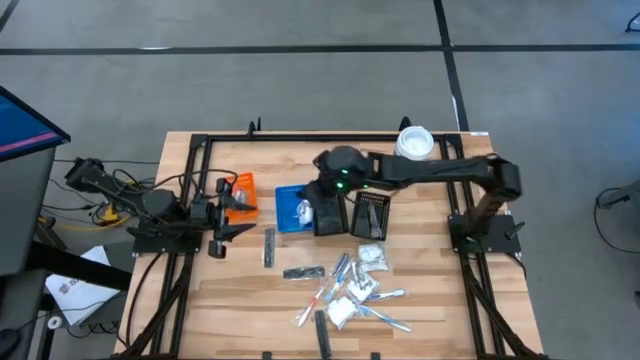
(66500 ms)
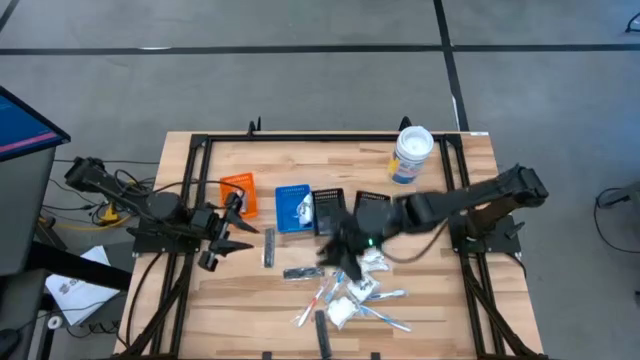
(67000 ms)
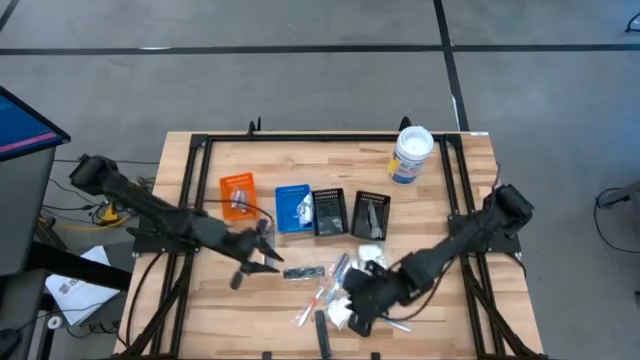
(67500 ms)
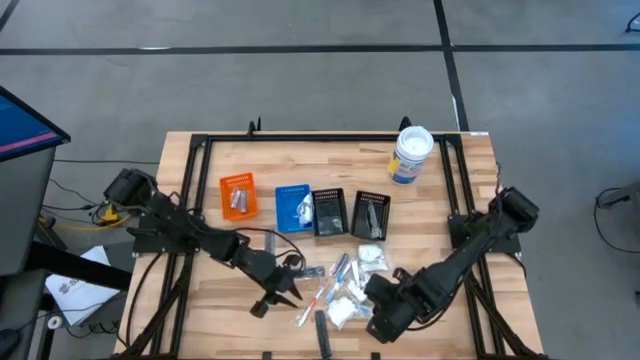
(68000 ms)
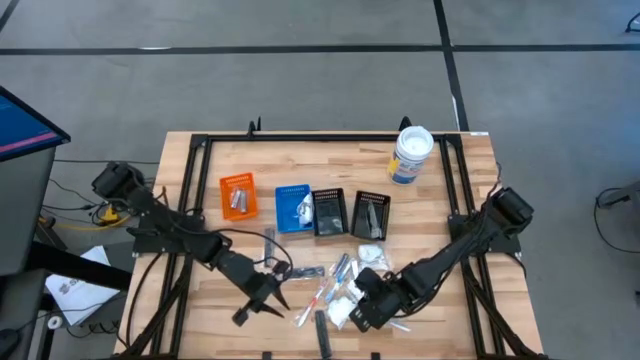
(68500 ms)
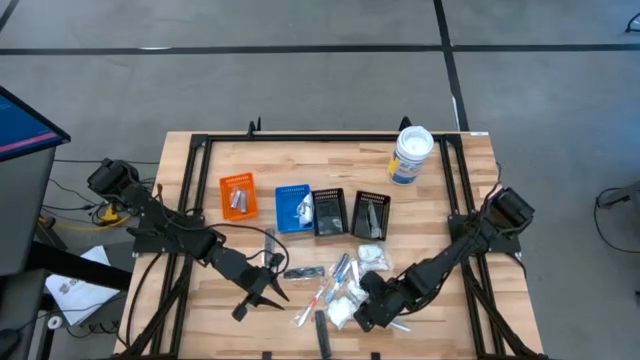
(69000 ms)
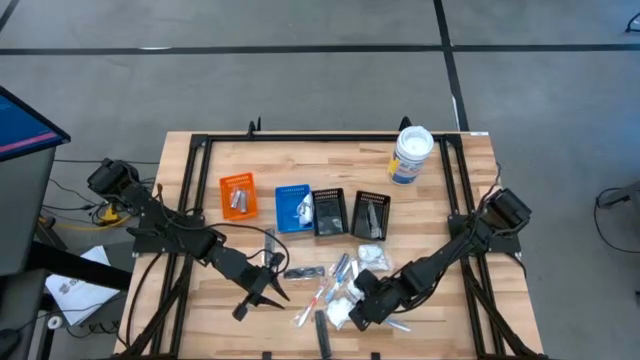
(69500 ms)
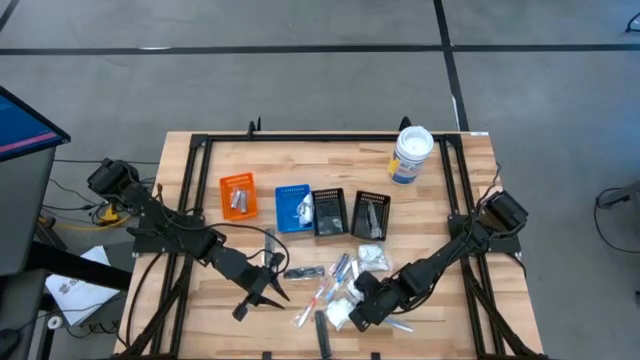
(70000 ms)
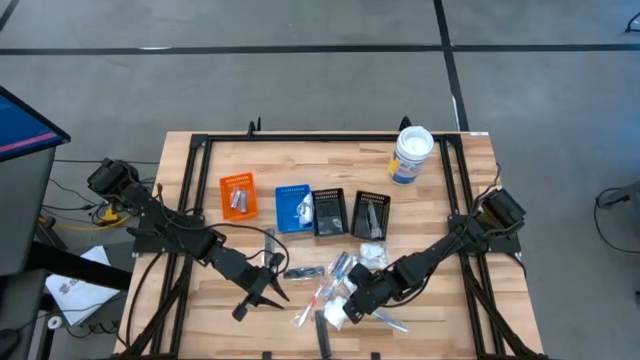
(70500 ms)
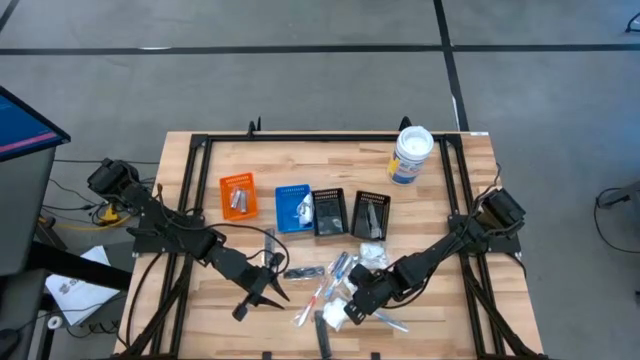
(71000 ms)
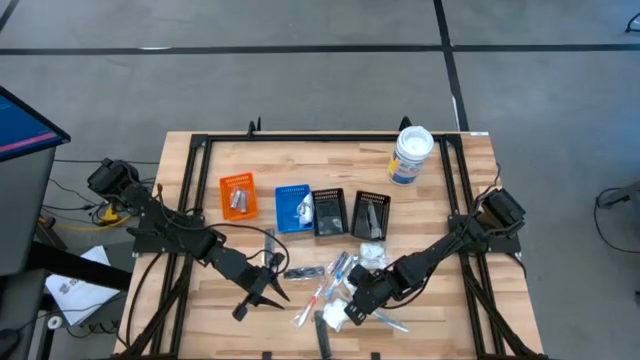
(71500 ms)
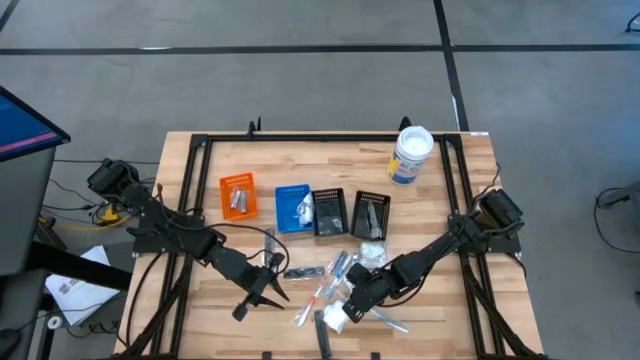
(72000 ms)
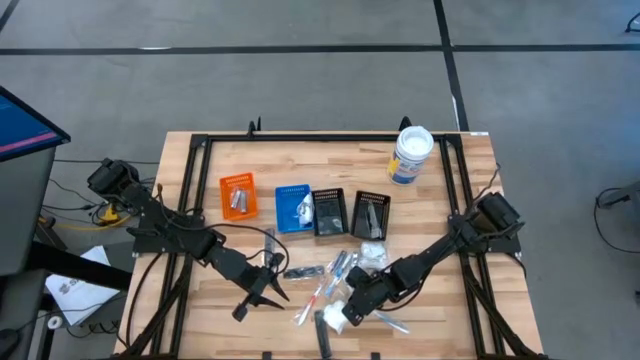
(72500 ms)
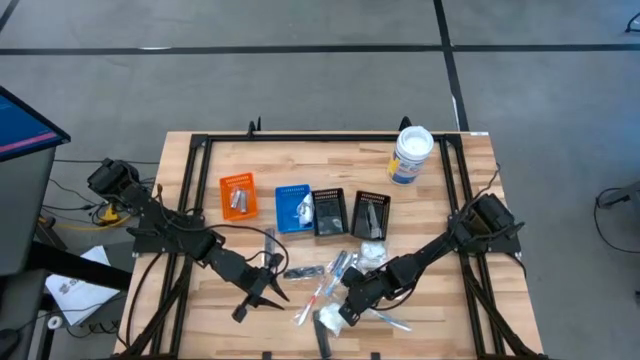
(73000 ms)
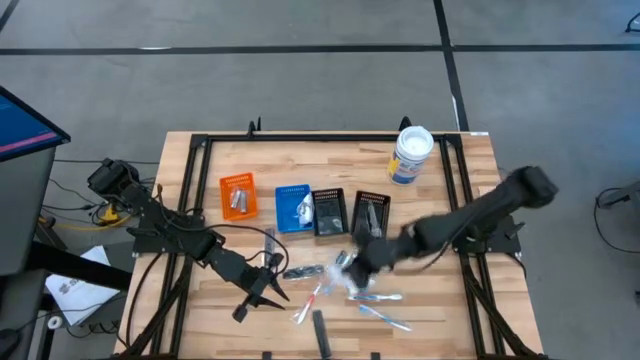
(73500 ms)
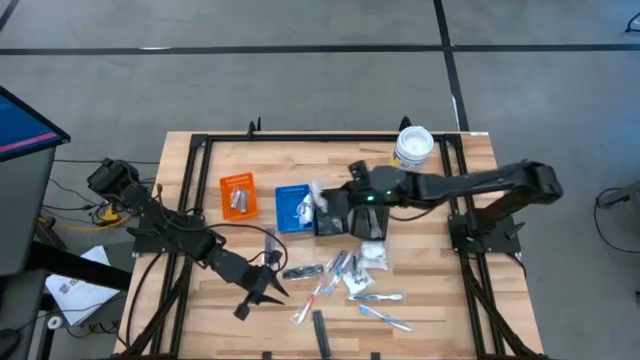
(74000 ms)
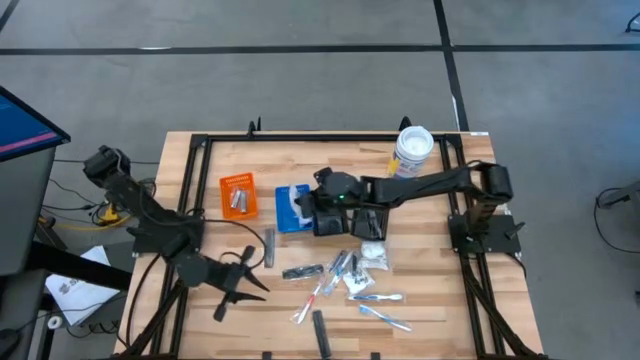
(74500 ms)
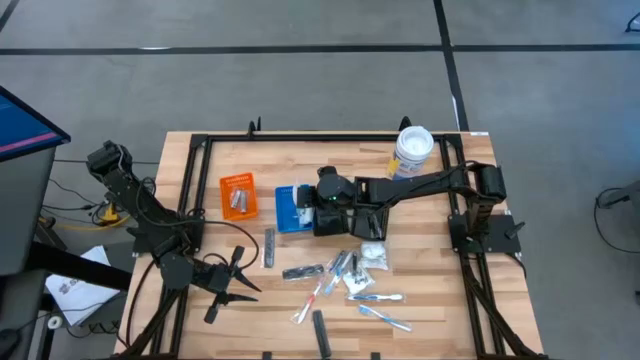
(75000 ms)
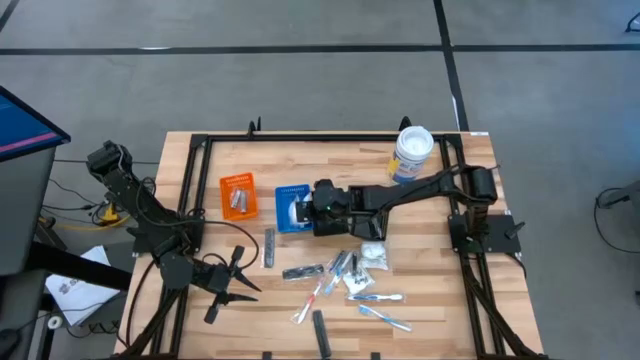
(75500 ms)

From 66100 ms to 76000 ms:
Task: Pick & Place Travel size toiletries
Put the pack of cotton buds into the blue bin

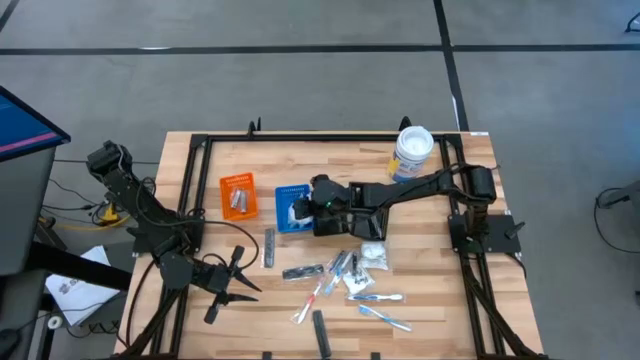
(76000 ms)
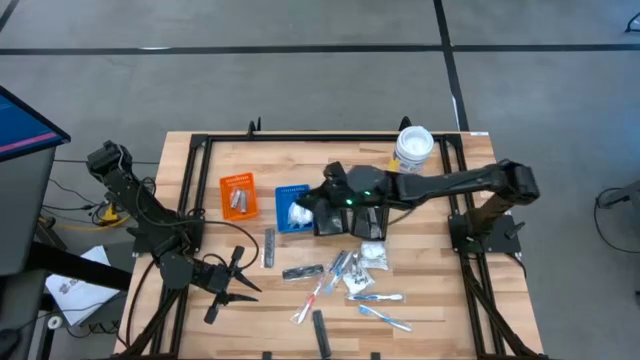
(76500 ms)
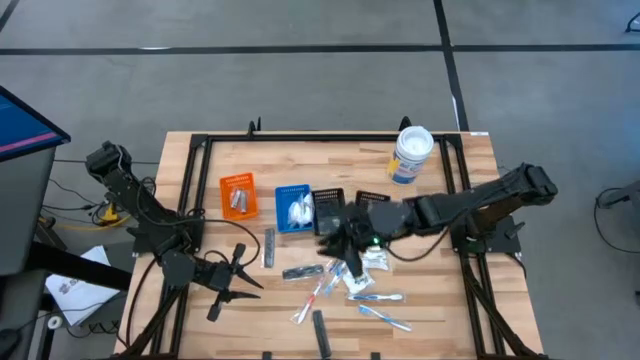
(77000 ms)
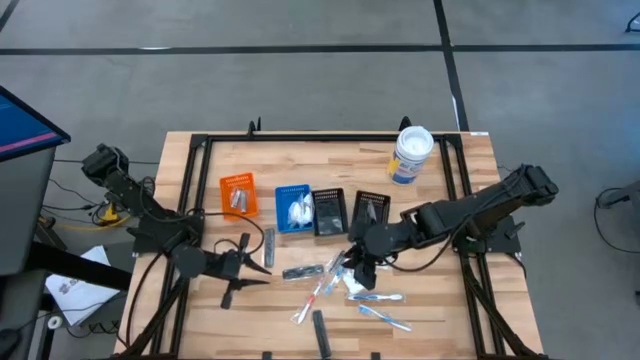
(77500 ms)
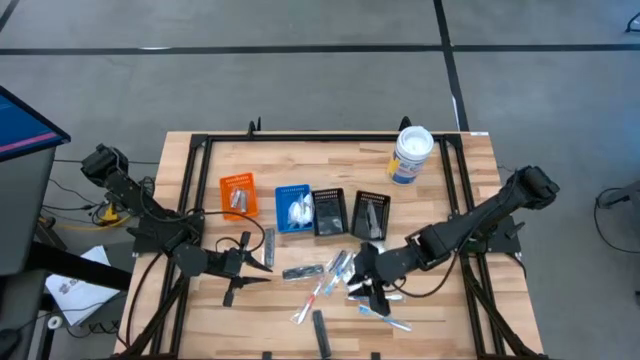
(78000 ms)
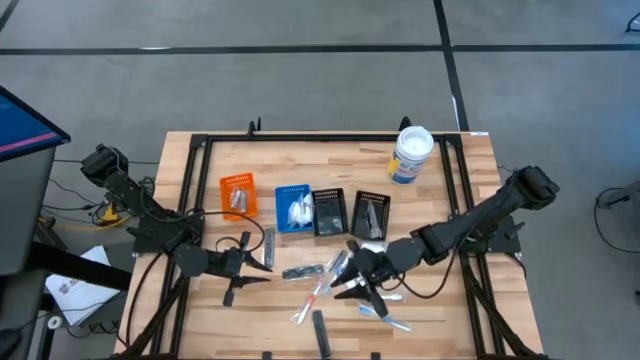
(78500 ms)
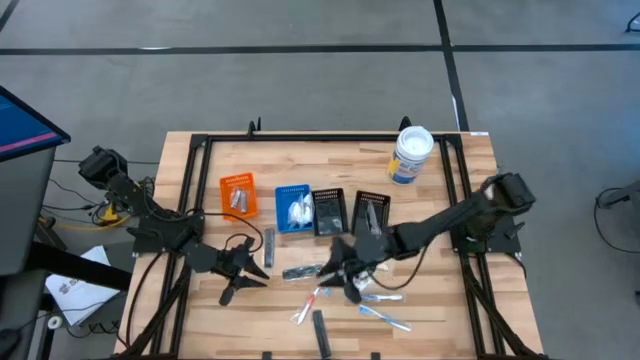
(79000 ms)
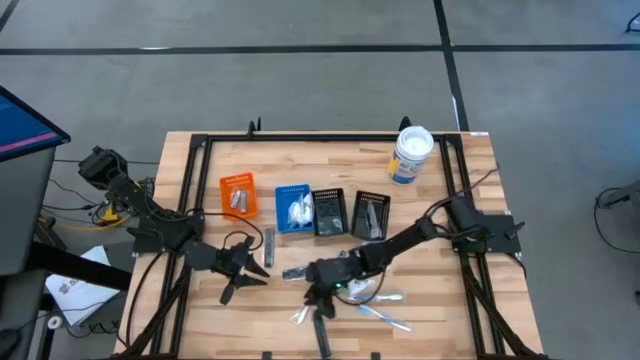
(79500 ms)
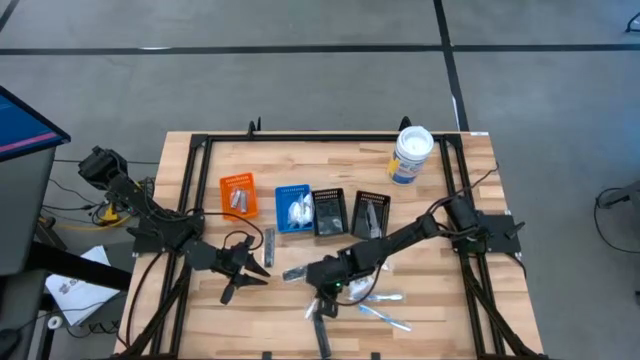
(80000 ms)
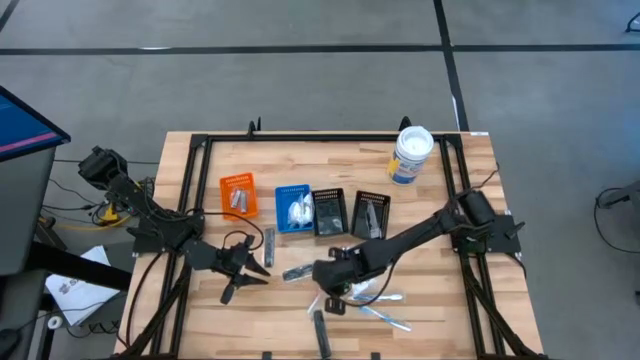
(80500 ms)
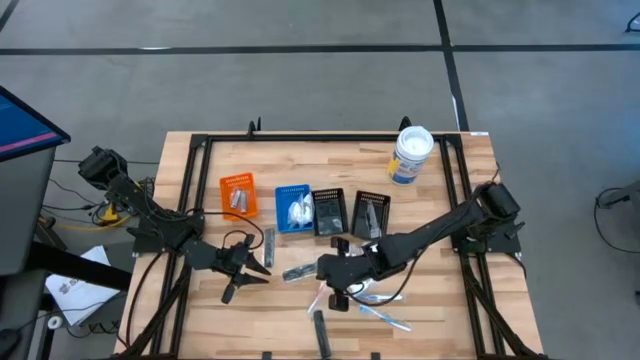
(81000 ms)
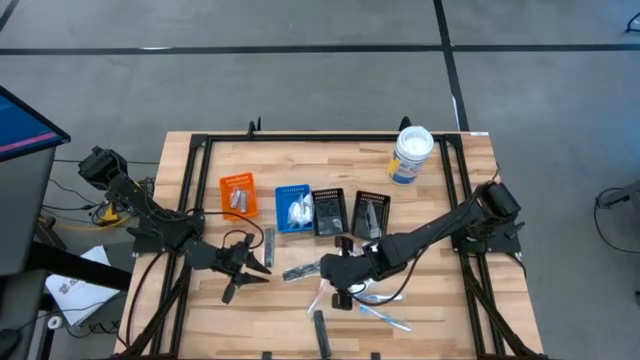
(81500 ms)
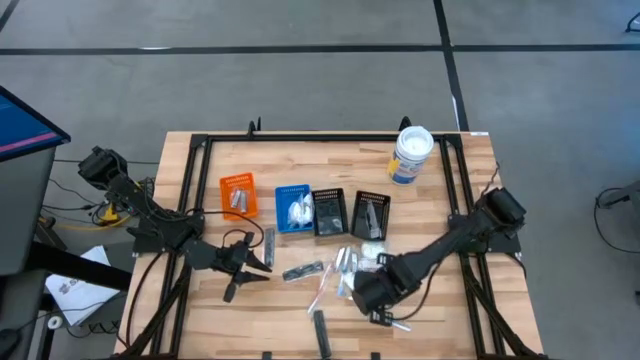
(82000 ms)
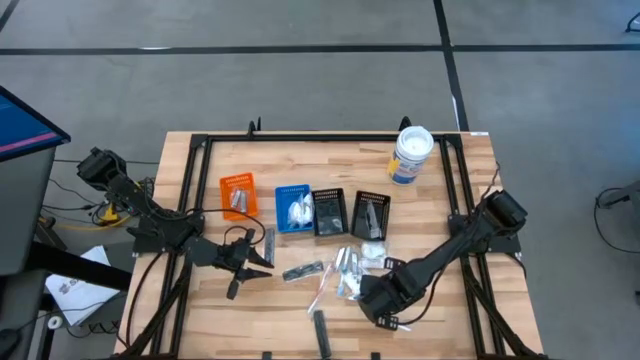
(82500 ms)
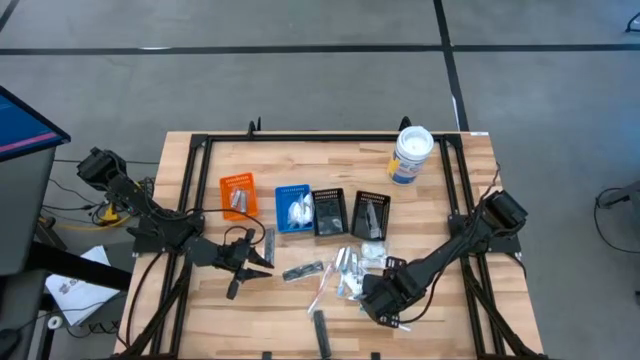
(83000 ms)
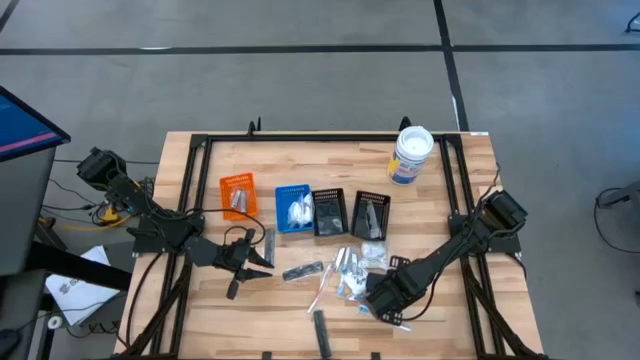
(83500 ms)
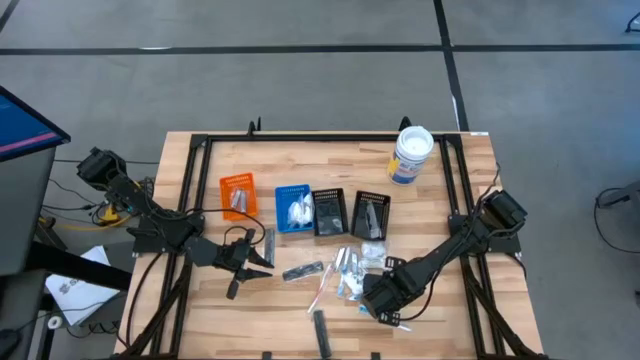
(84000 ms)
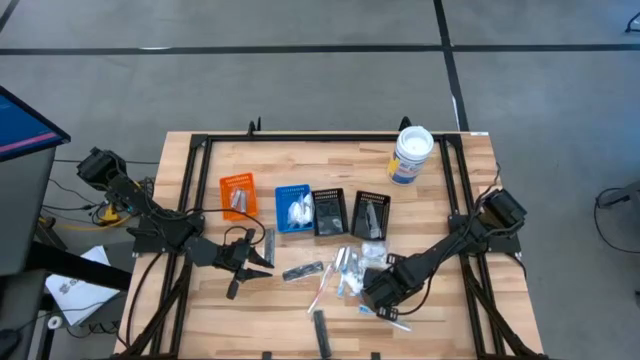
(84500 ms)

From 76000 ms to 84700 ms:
Put the orange toothbrush into the left black bin

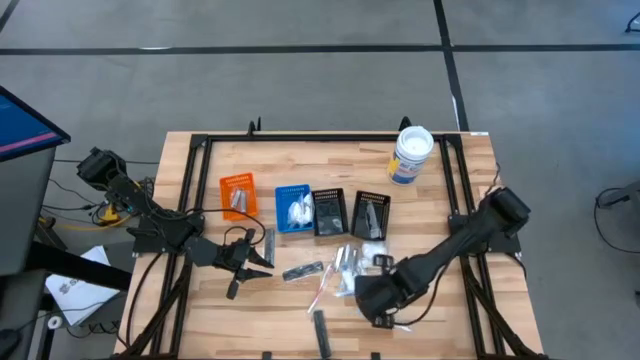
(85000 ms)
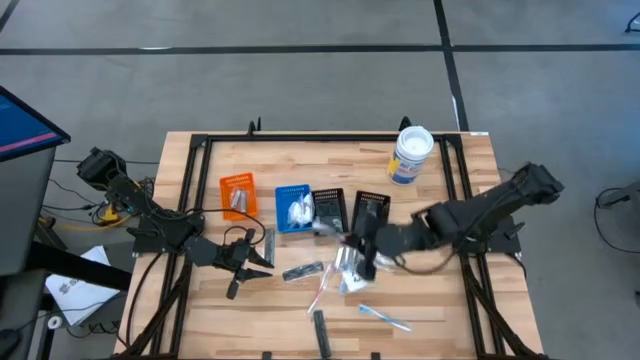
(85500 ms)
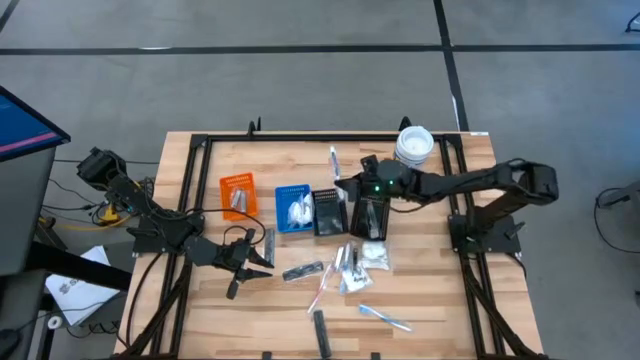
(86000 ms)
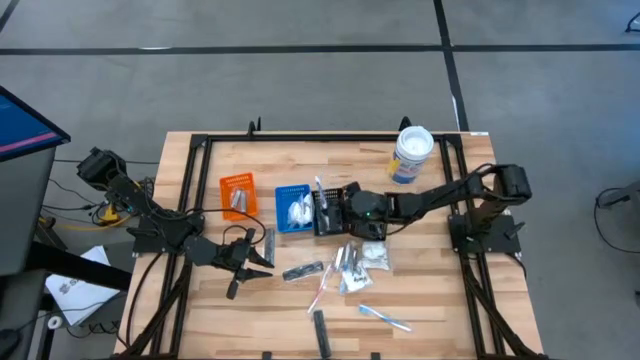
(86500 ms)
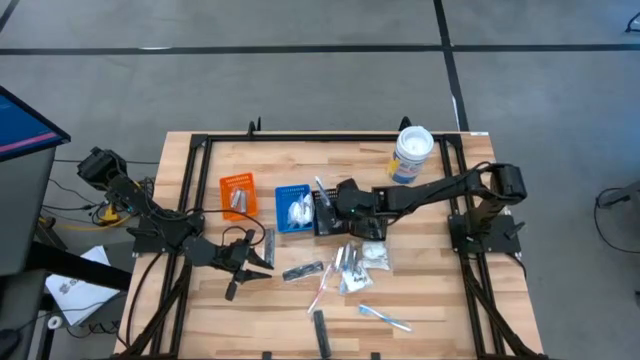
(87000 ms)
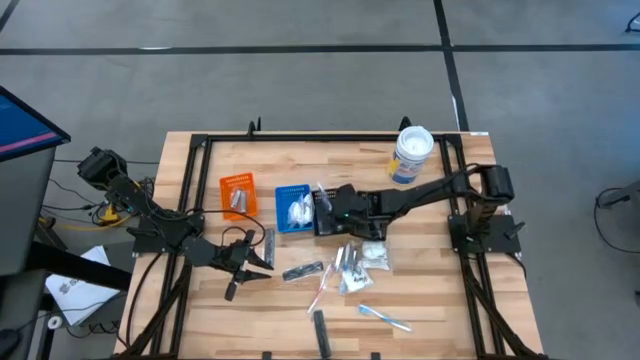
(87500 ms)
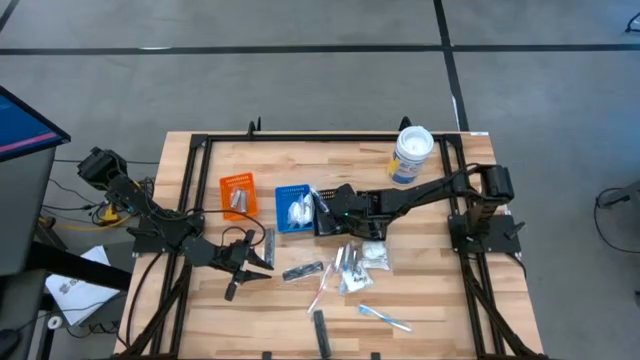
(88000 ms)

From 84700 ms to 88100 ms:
Put the blue toothbrush into the left black bin
